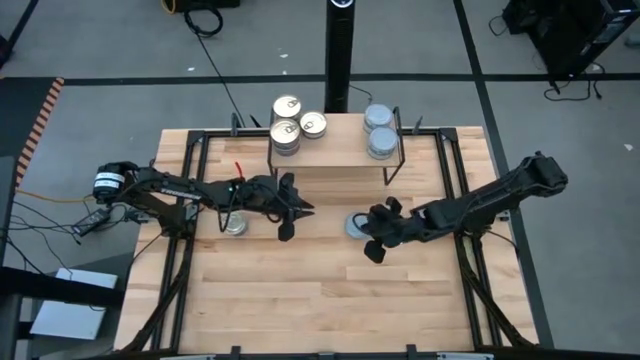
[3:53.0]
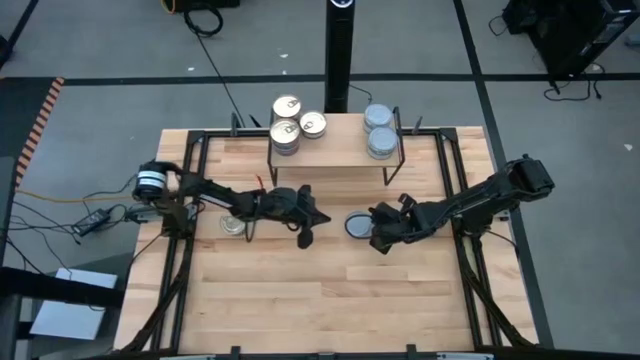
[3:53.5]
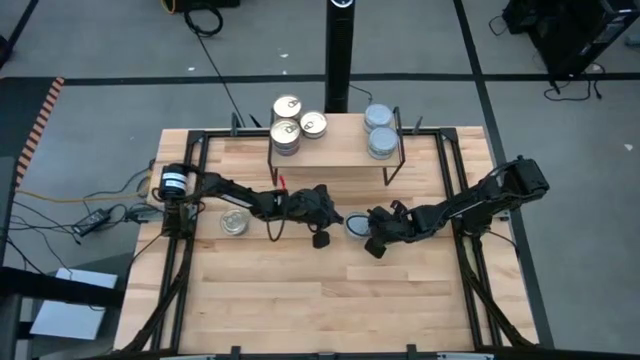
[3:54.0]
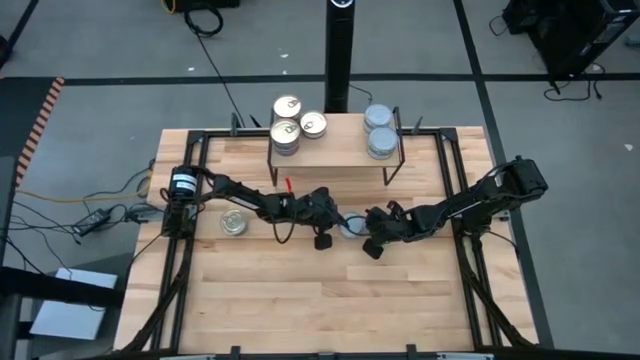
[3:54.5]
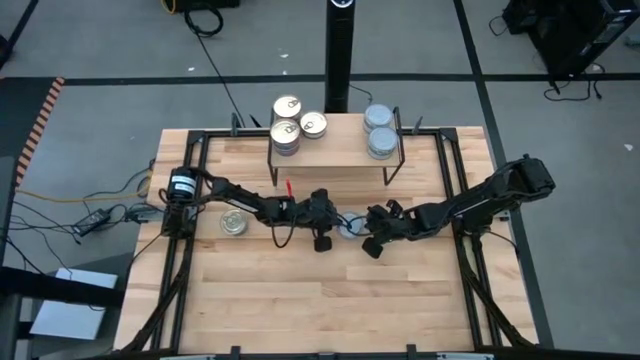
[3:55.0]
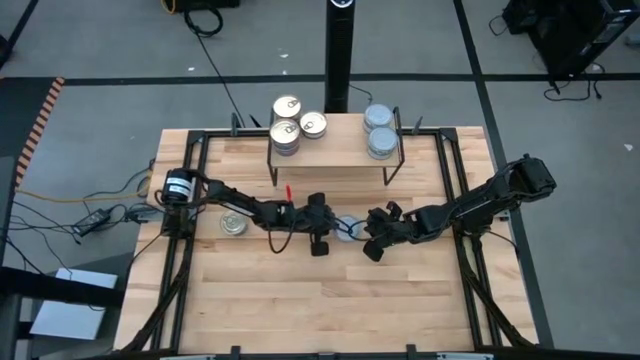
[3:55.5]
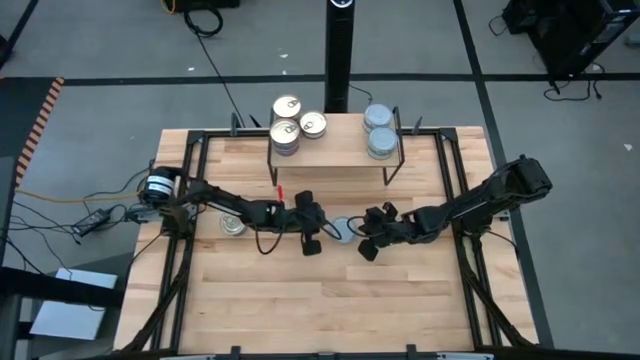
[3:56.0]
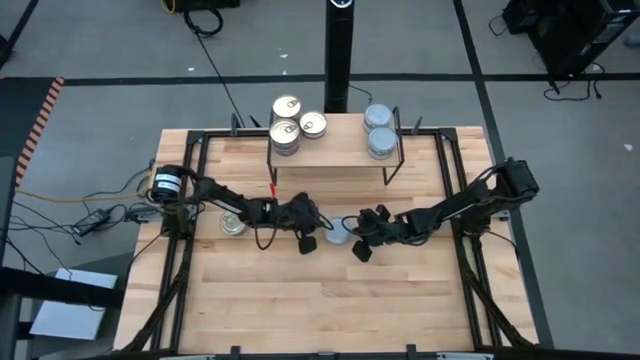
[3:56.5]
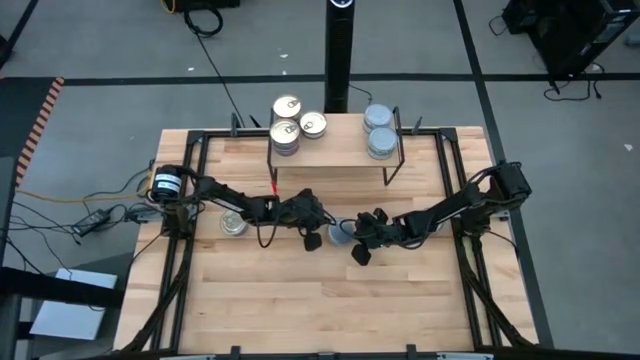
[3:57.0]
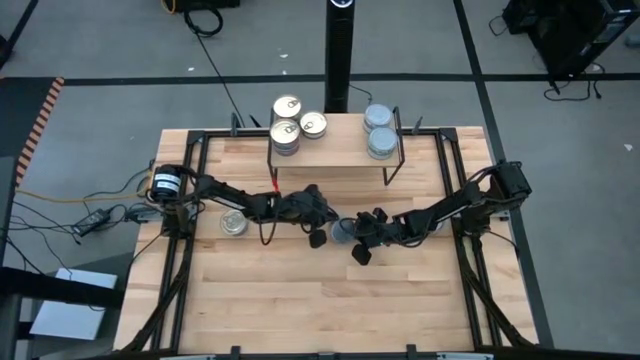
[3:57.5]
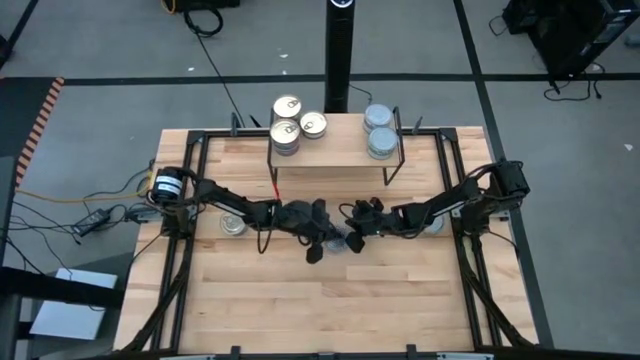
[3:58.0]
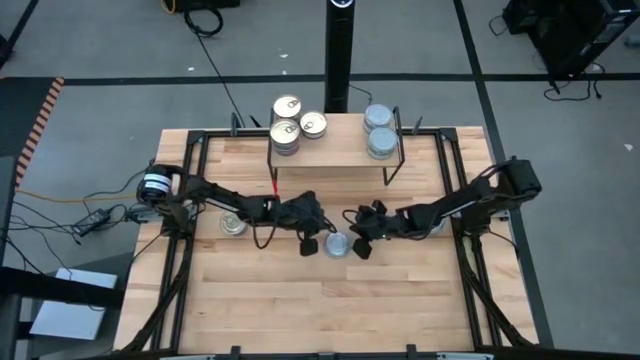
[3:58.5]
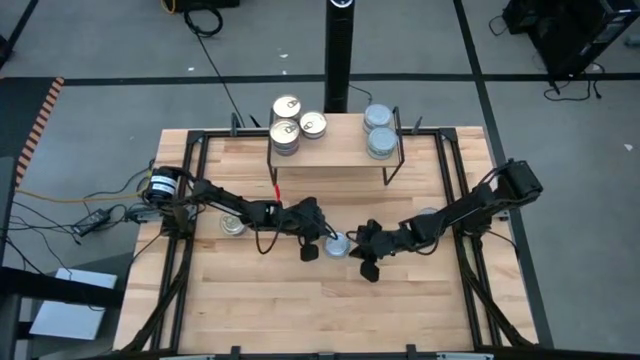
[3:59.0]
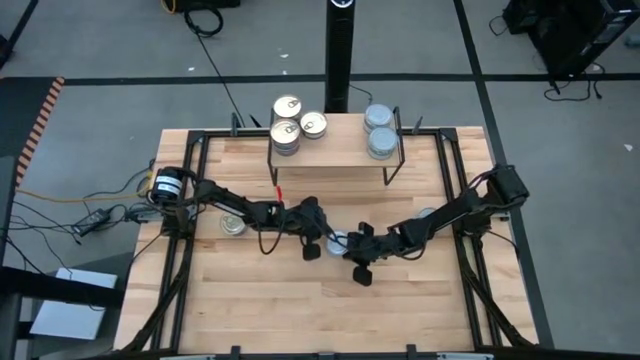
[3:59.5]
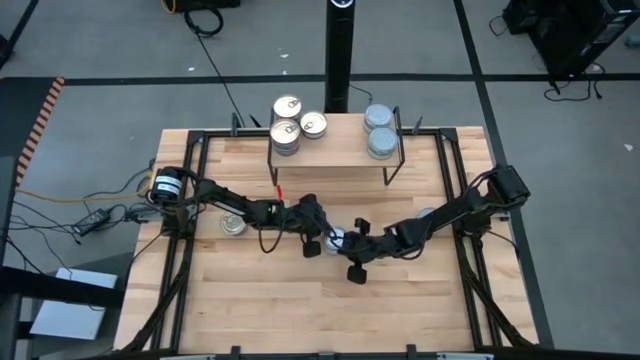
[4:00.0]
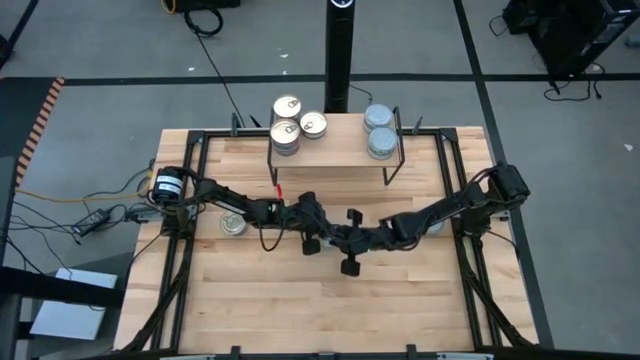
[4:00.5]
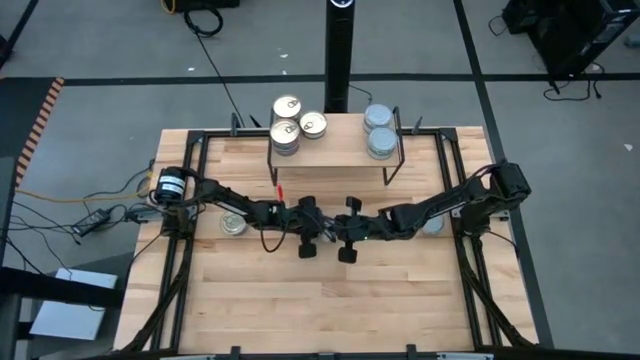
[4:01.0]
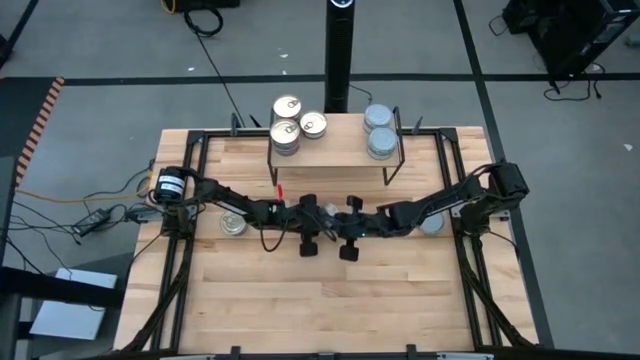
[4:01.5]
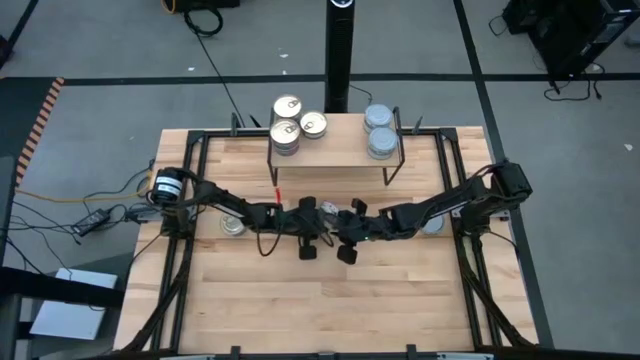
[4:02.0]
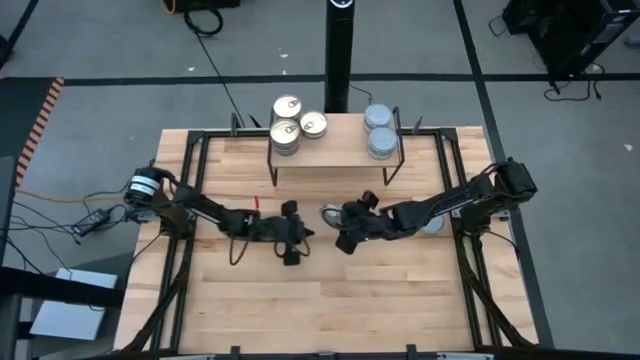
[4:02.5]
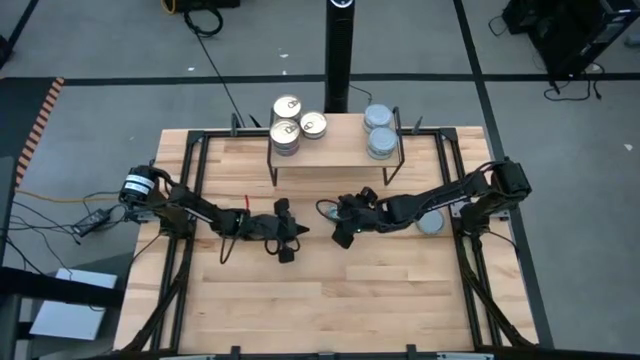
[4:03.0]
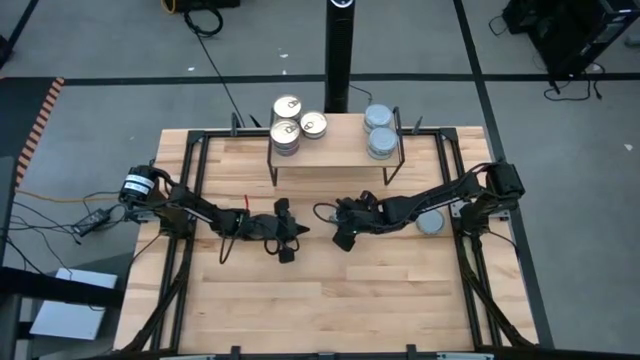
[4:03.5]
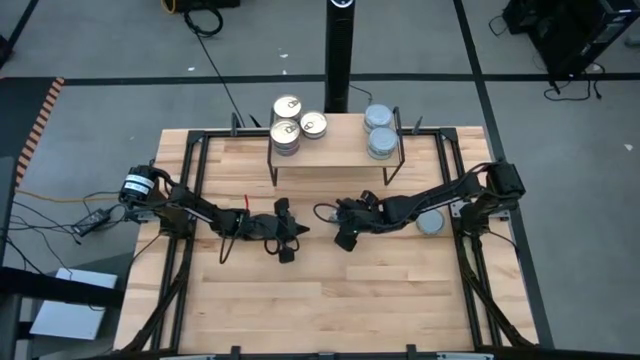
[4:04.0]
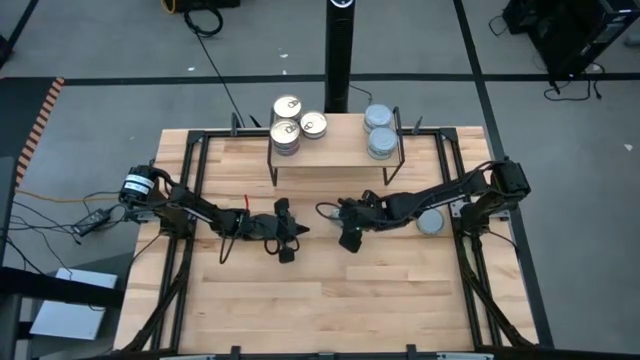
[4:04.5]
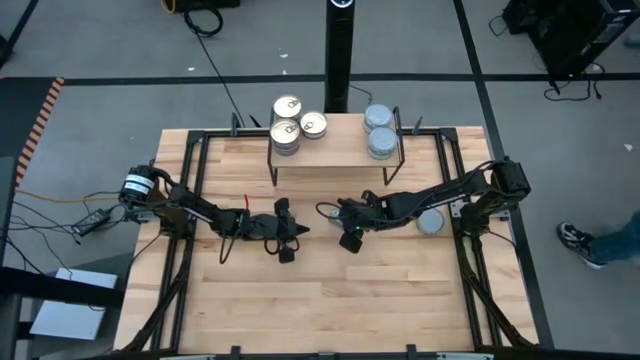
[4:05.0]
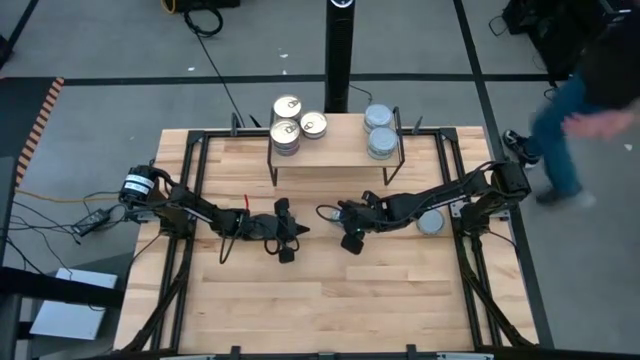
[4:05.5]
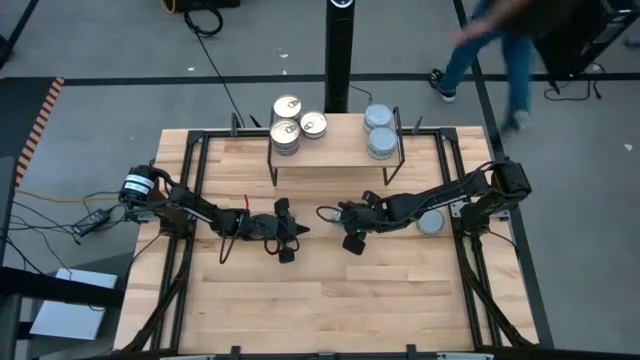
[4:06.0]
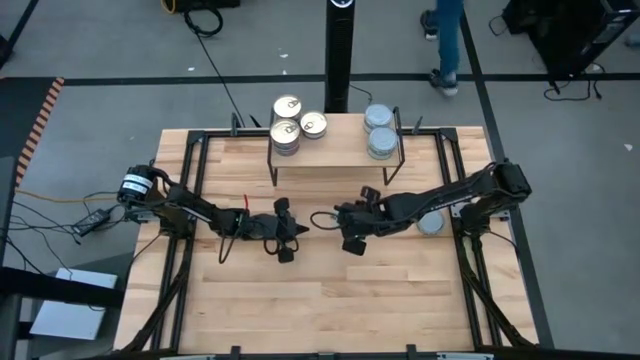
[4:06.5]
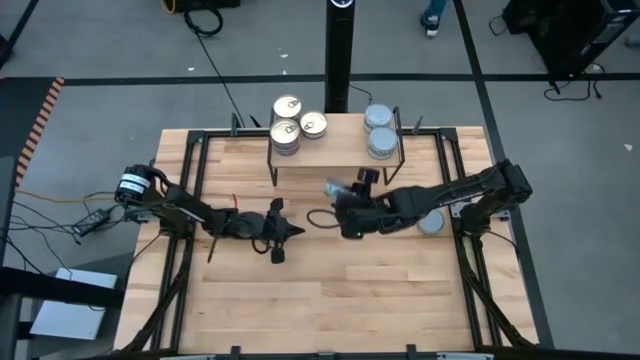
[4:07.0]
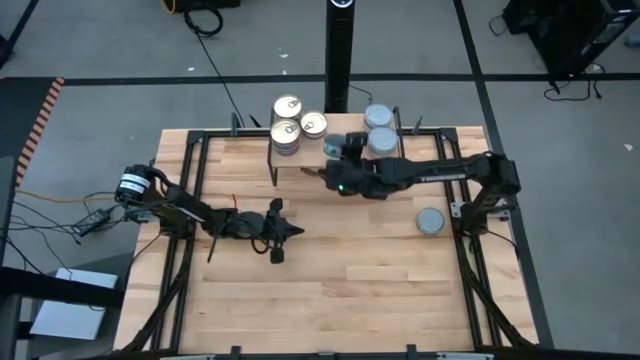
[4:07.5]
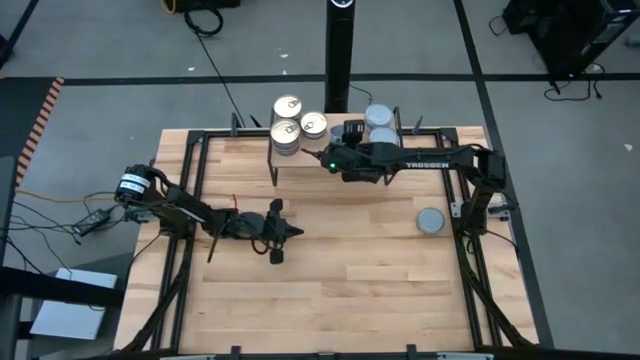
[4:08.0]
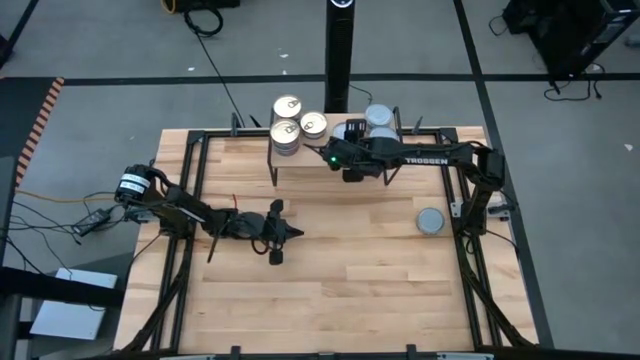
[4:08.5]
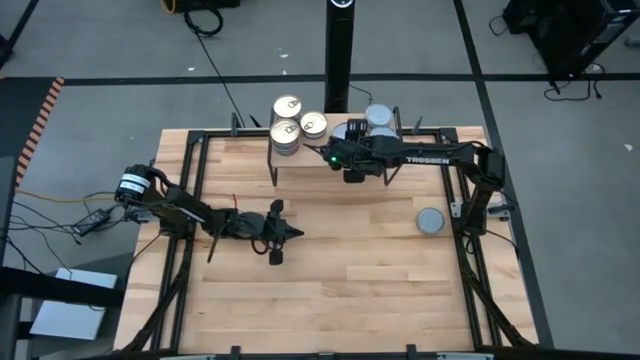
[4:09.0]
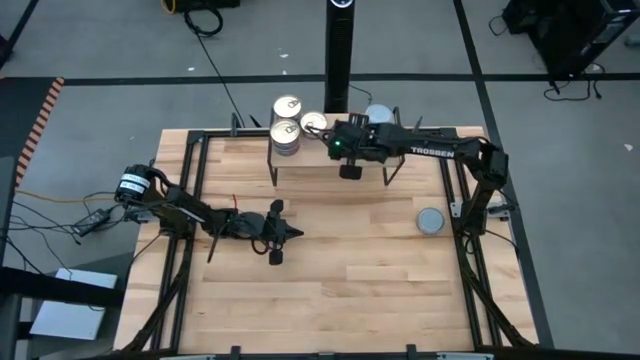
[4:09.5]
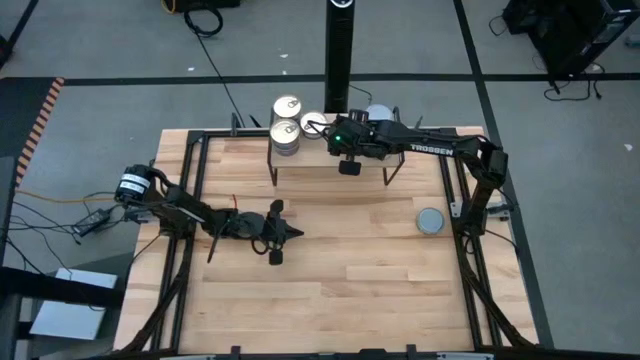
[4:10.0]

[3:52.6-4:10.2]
Task: Stack canned seafood by type on shelf
Put the green tuna can on the shelf

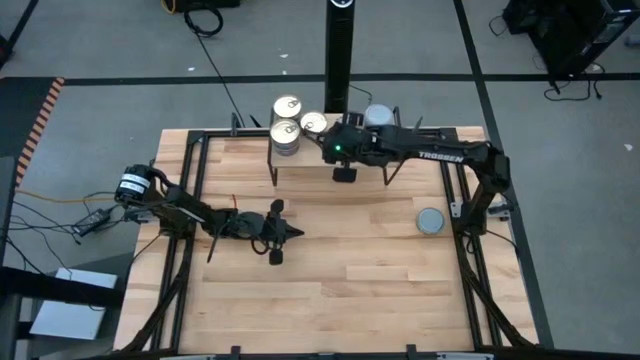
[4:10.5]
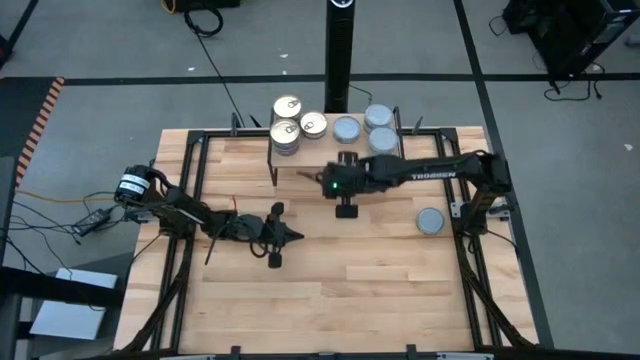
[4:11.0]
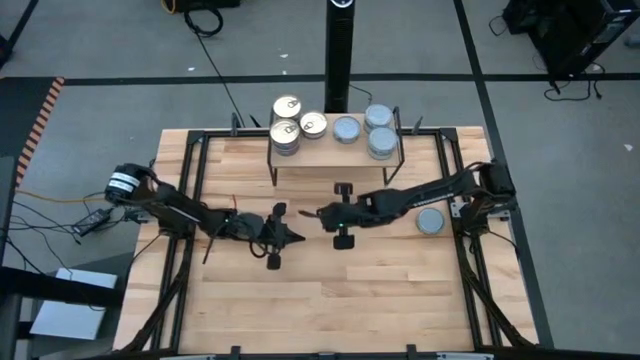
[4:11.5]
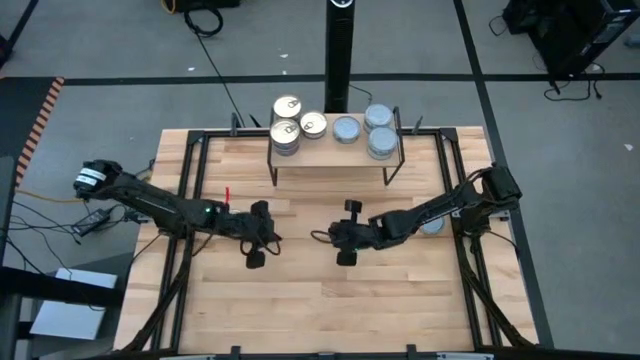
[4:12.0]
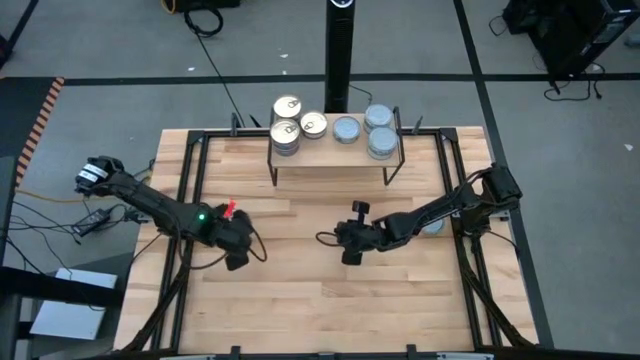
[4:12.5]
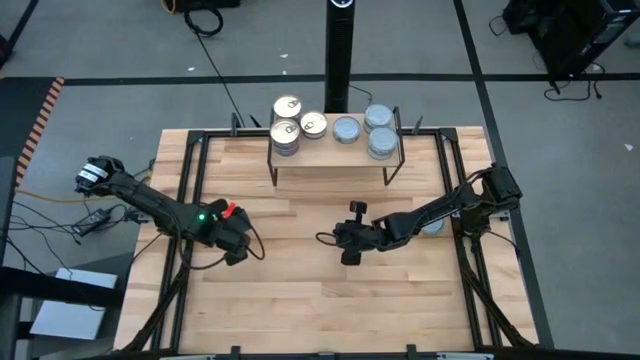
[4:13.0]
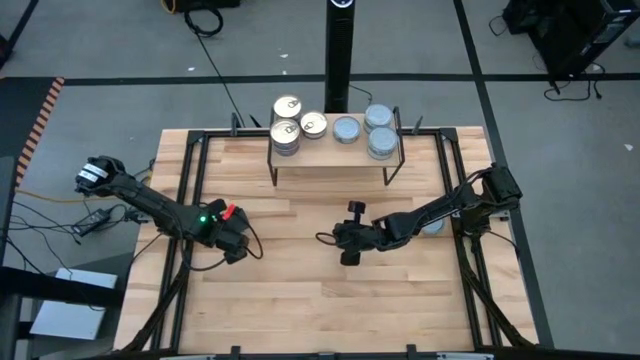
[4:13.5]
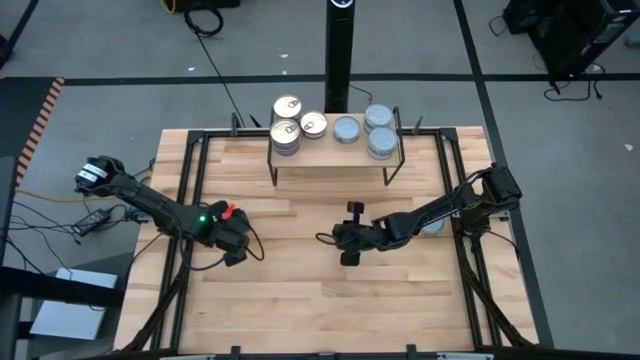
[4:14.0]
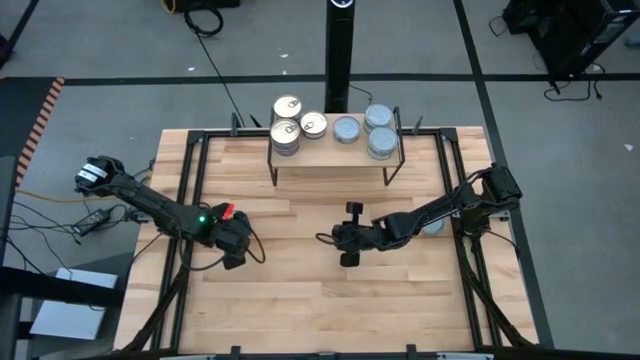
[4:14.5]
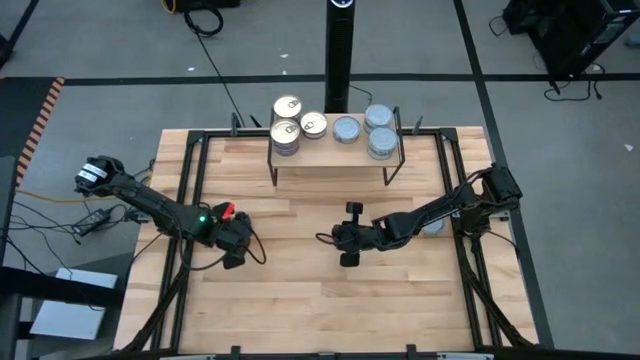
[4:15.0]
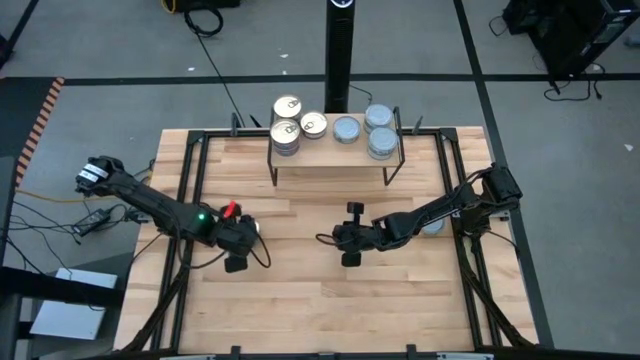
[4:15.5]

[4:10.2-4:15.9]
Stack the blue pink tuna can on the right blue tuna can on the shelf
